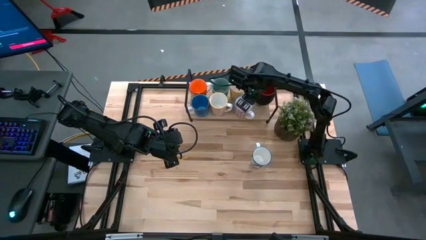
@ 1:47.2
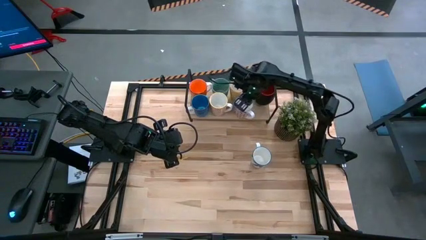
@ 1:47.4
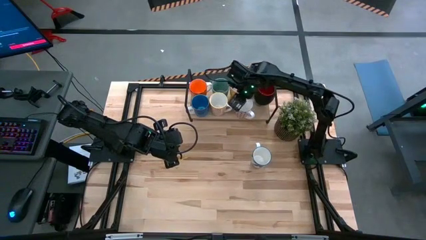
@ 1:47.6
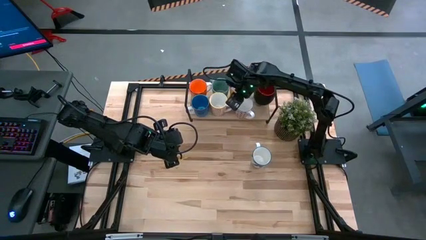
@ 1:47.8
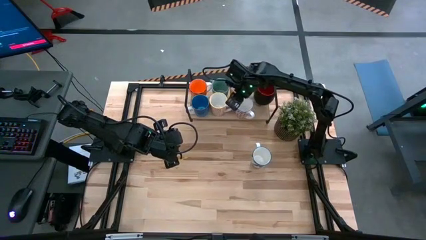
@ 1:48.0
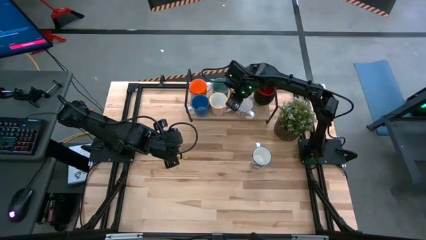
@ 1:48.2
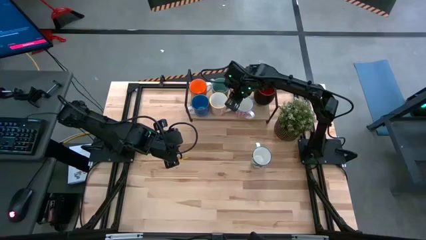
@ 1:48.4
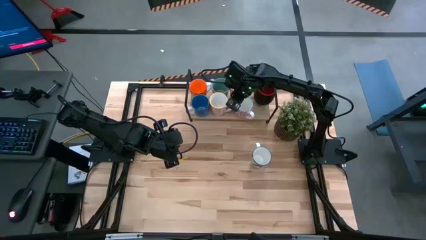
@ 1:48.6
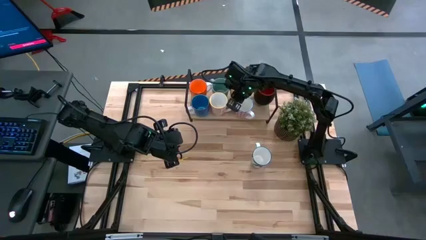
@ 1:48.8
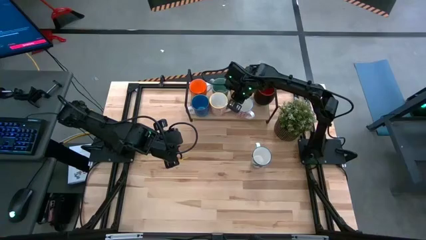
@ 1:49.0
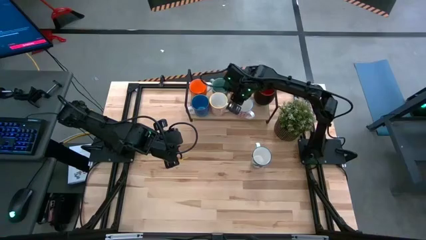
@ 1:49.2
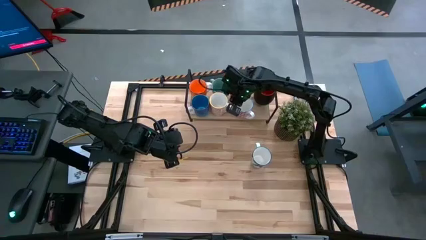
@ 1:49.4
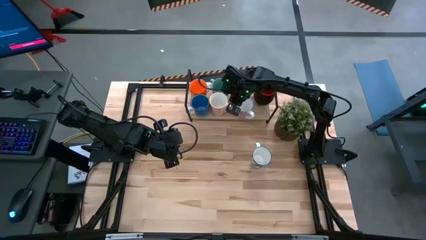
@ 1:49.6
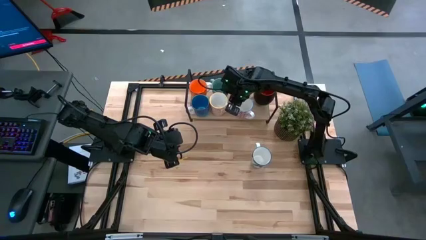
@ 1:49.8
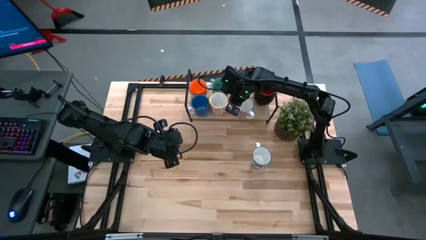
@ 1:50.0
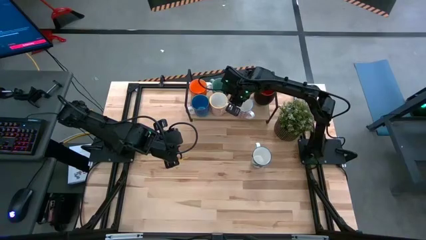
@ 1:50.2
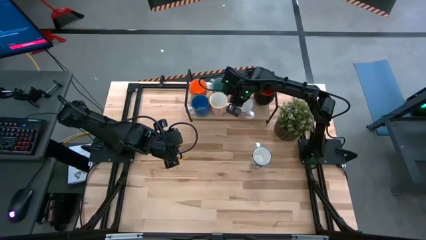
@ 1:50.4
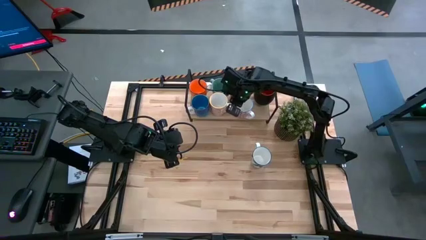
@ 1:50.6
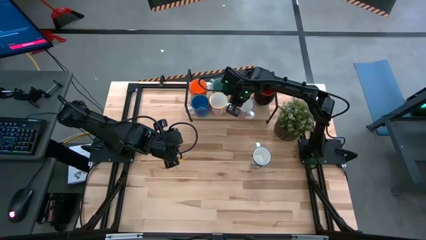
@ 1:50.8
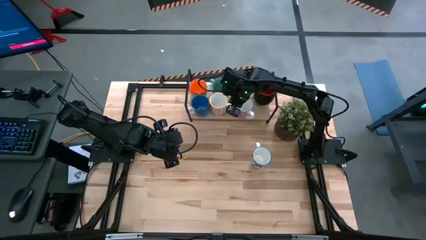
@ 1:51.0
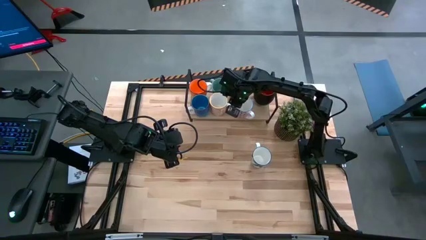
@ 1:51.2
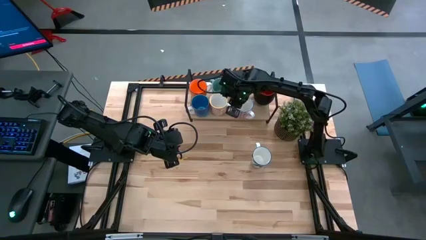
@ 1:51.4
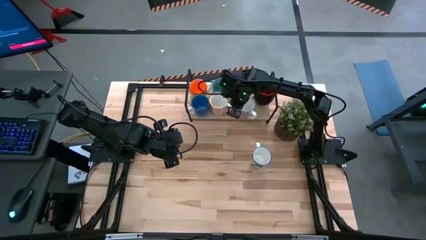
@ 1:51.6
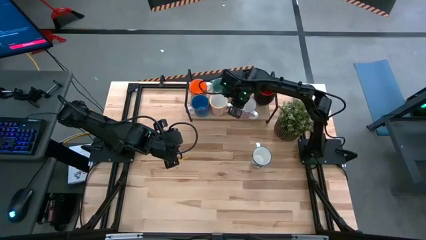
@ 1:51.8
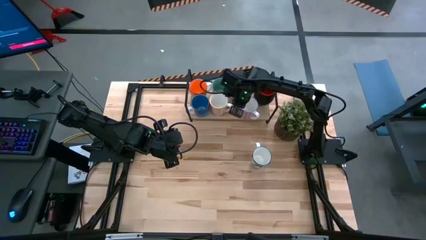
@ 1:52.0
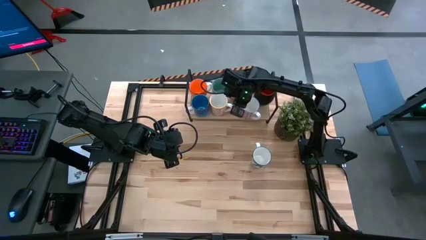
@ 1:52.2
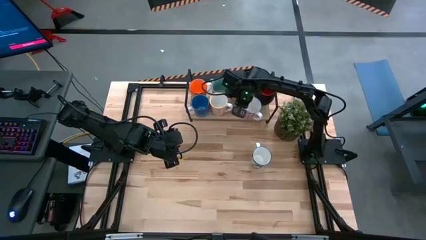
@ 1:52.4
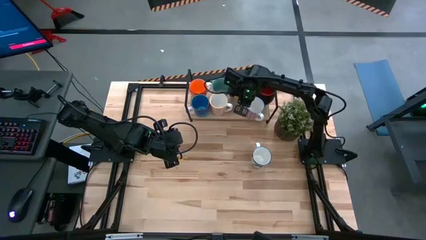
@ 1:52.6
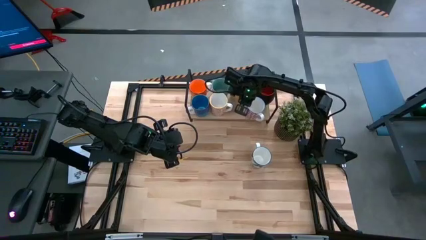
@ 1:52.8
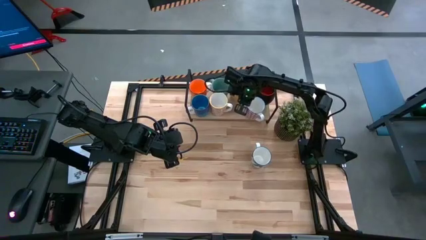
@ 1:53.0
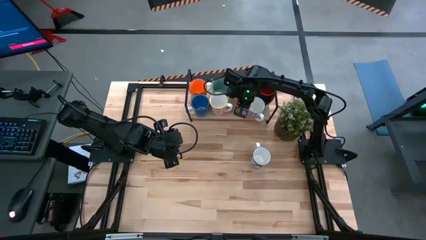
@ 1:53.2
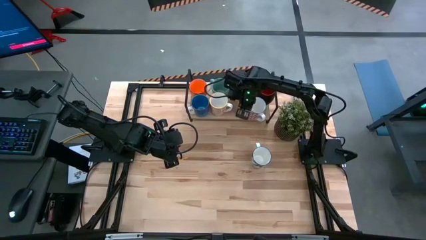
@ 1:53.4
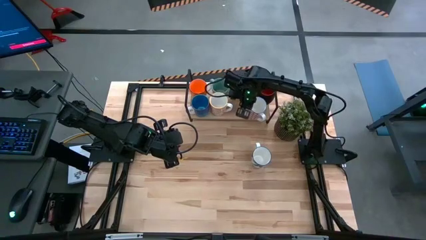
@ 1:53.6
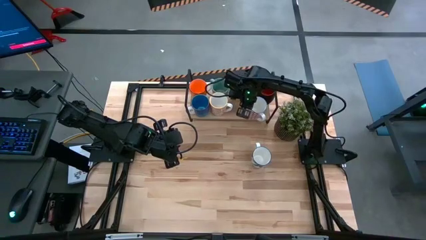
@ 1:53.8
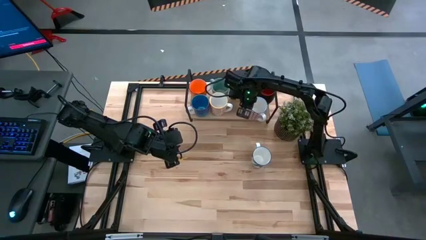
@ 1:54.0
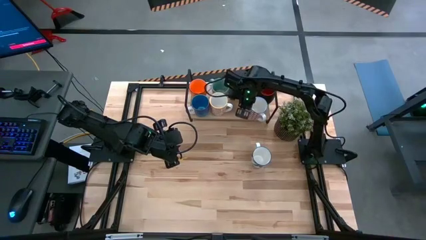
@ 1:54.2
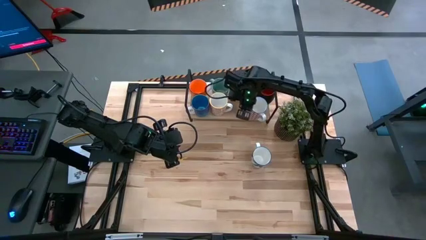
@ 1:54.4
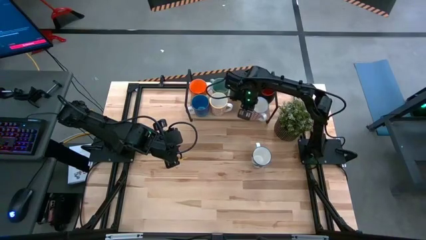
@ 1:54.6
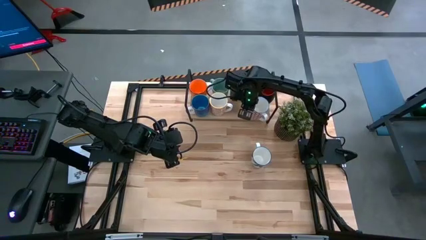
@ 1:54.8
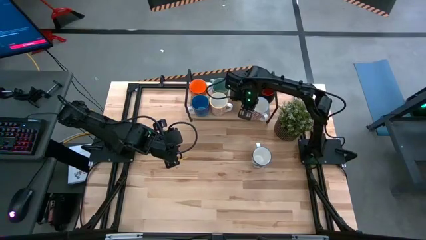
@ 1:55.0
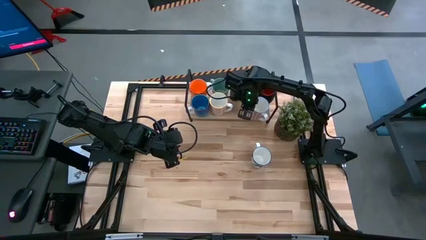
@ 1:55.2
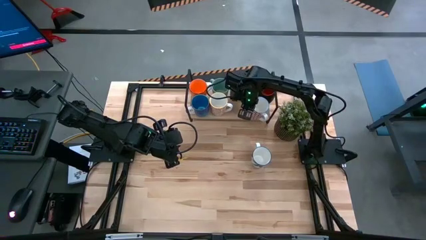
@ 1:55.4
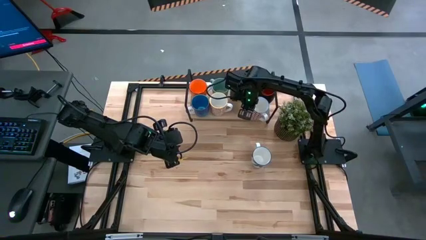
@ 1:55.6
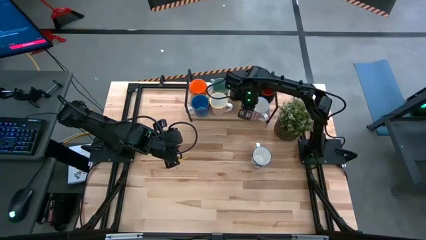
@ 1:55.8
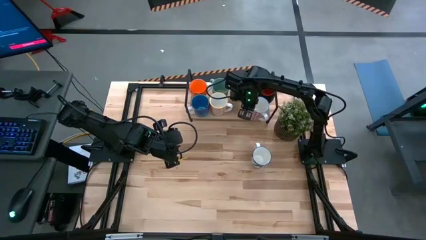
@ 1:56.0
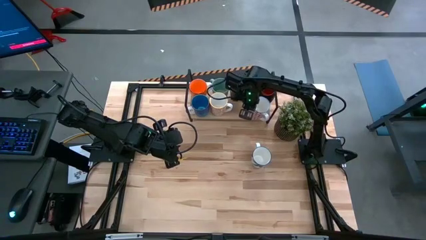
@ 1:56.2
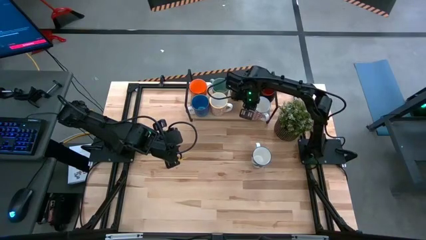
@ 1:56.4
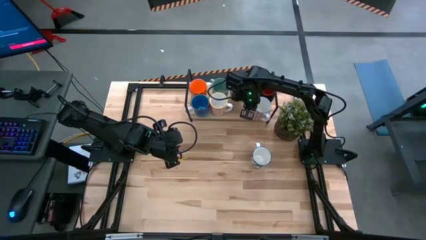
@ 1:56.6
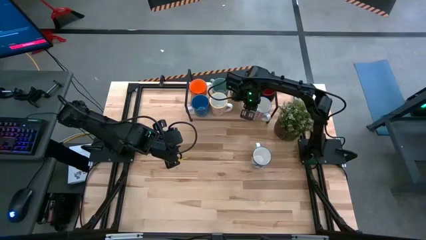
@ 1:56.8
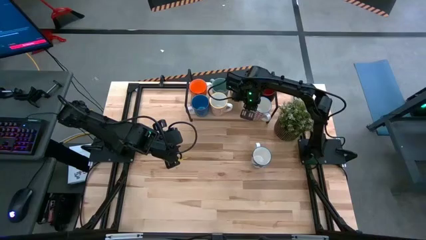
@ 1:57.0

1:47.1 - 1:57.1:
Task: Place coffee mugs
Adjust the red patterned mug on the shelf

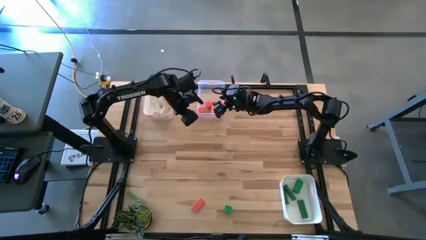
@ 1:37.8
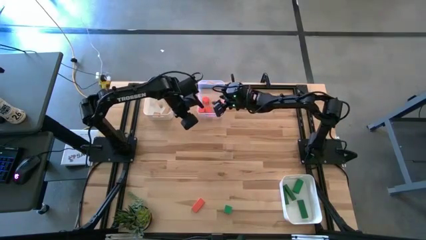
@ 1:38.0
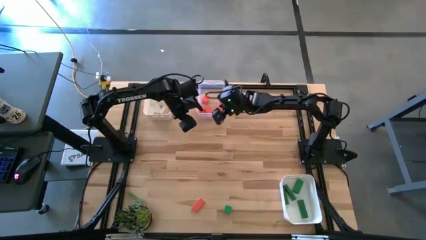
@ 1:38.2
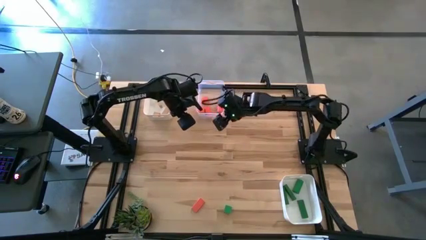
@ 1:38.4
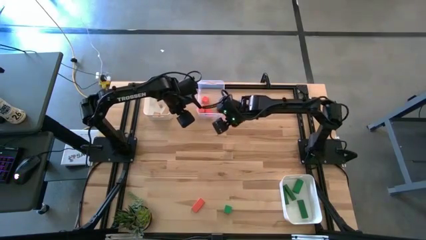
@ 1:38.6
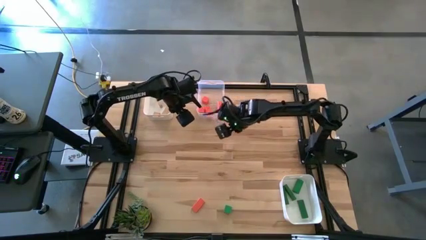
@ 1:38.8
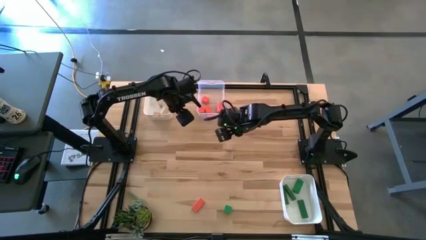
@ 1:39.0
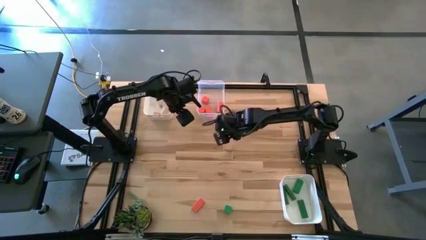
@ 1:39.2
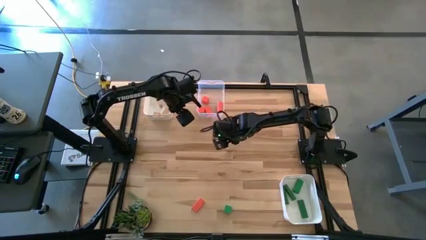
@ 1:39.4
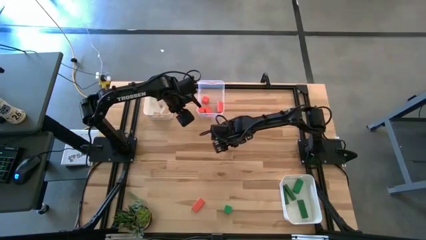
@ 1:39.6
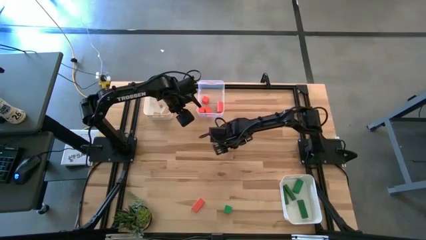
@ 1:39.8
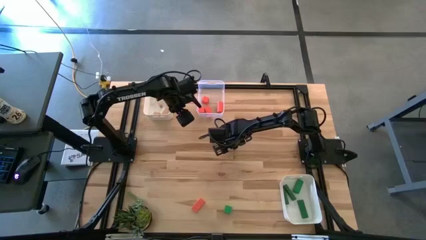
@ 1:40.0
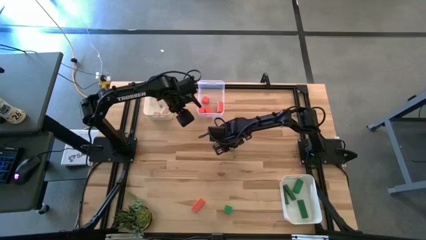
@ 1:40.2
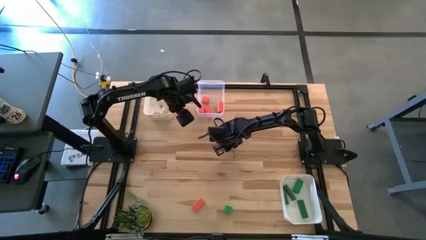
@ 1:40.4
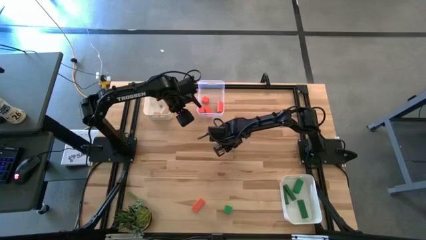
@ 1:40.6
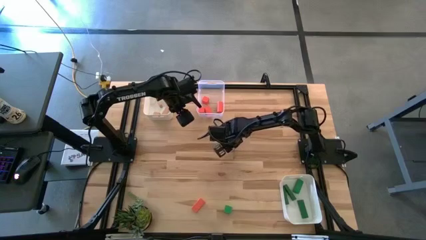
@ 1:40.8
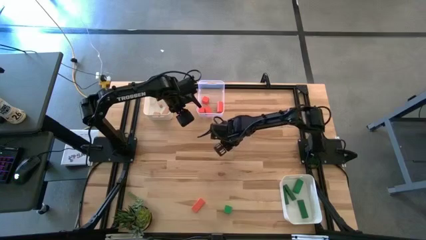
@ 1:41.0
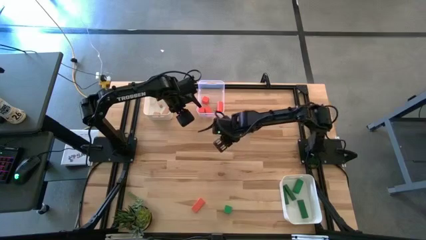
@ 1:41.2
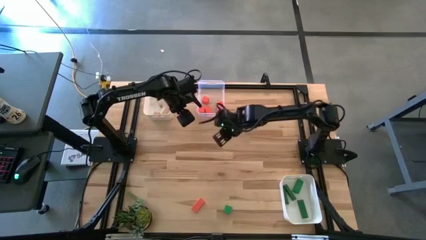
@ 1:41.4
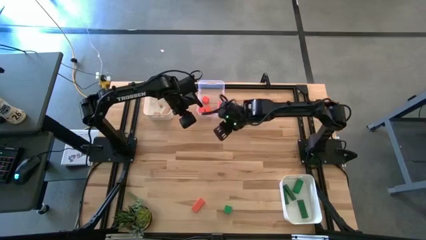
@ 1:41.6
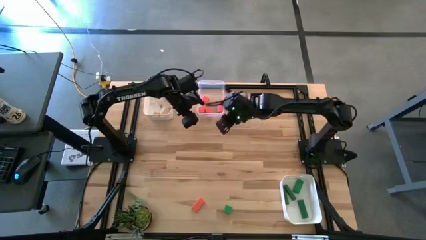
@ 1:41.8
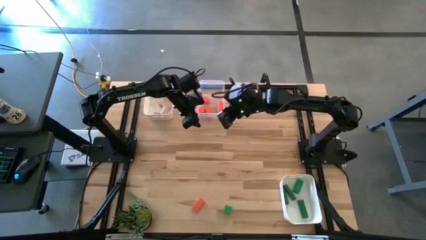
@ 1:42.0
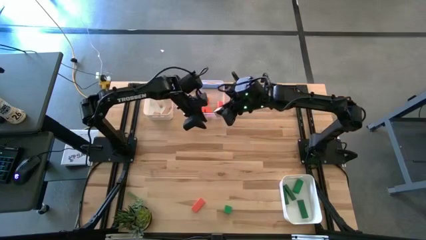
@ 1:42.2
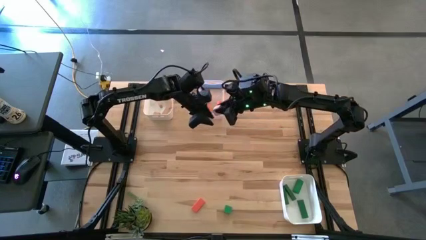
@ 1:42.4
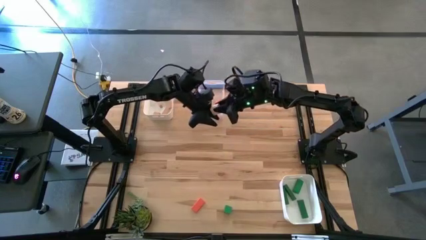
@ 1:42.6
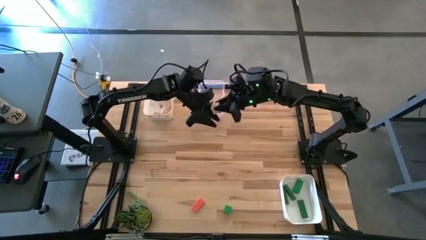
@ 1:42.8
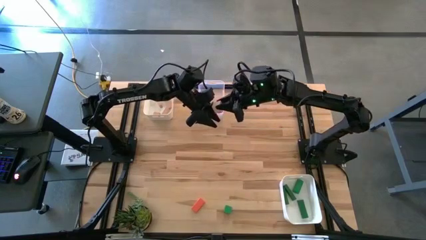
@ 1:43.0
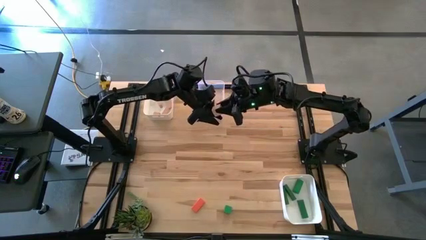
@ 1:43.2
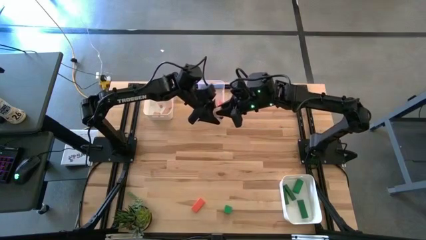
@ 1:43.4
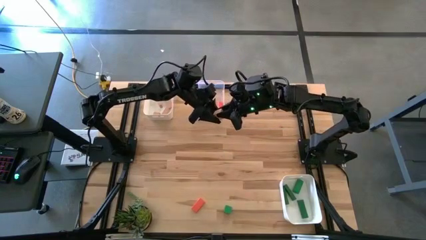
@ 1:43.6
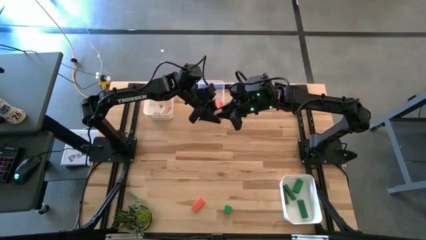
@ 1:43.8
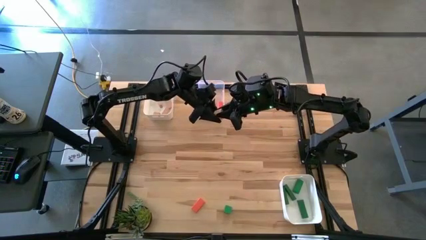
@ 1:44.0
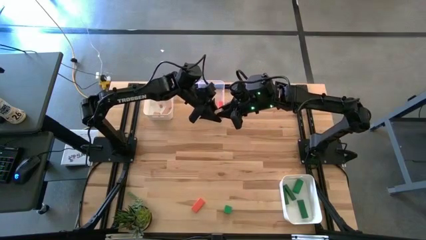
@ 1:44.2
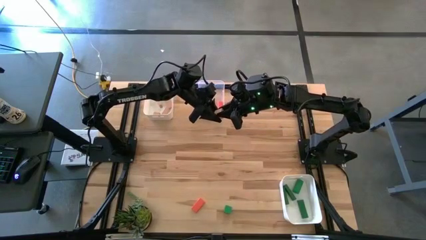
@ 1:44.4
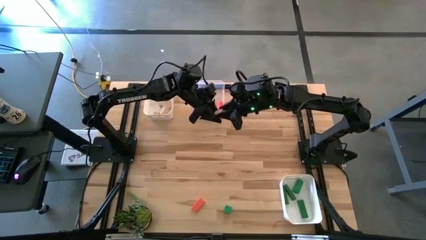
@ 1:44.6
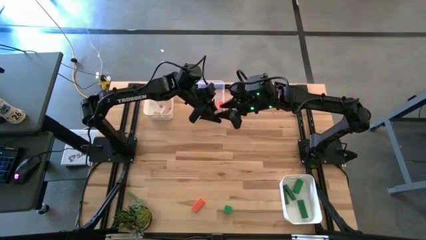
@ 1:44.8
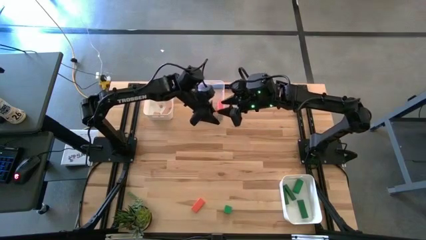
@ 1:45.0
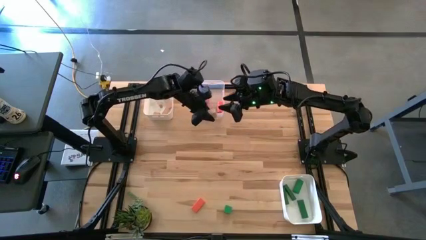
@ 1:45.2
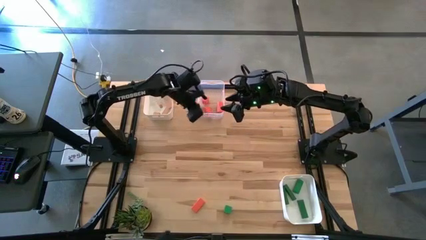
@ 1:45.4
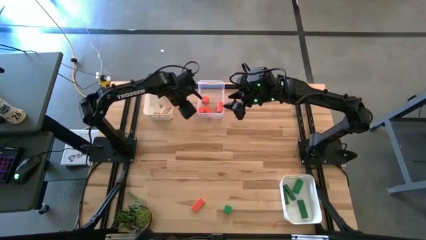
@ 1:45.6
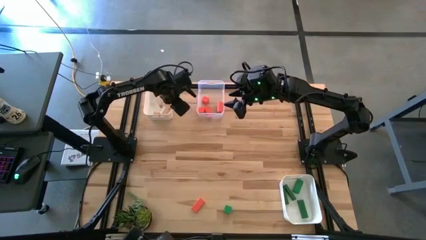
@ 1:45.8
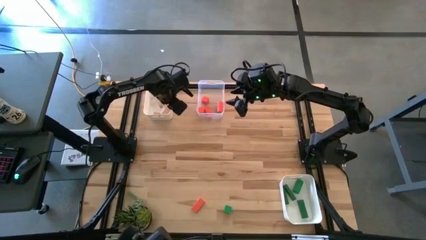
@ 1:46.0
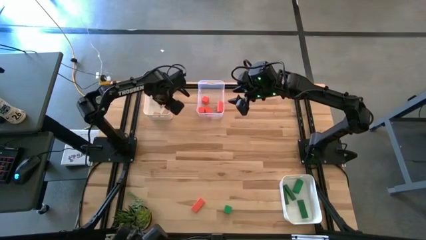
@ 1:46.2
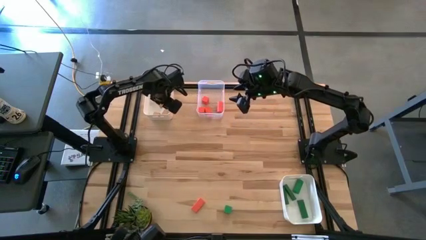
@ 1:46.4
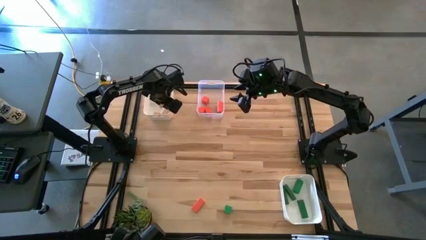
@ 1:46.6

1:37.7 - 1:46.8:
Task: Sort & place blocks by color
Put the brown block into the top white bin
